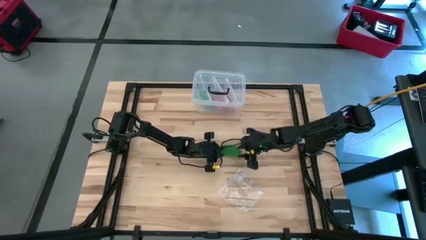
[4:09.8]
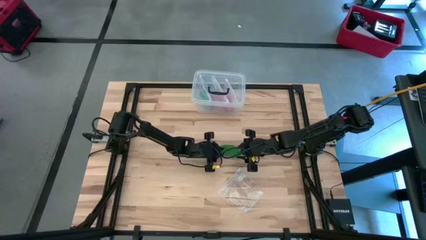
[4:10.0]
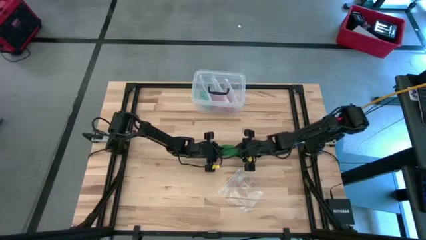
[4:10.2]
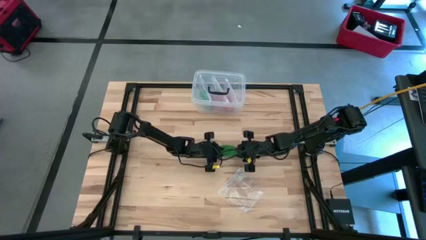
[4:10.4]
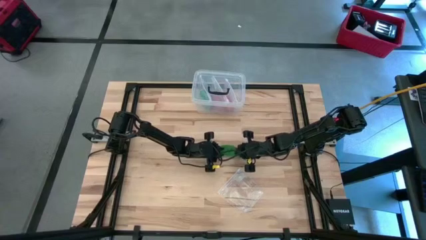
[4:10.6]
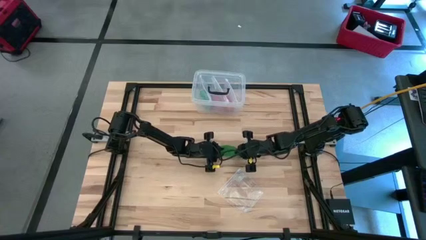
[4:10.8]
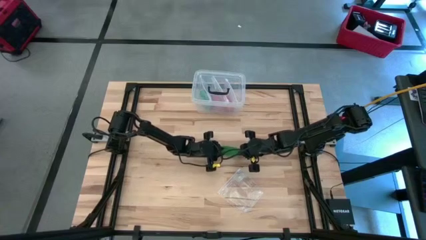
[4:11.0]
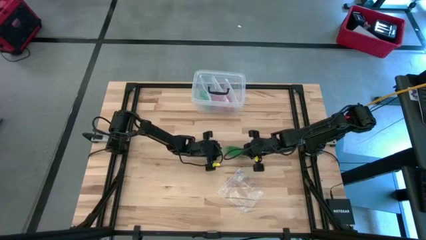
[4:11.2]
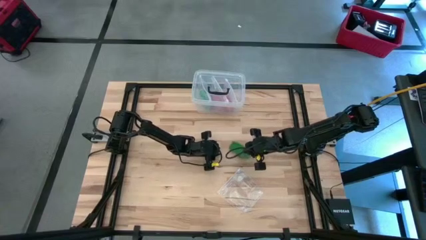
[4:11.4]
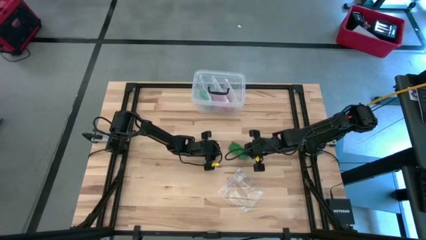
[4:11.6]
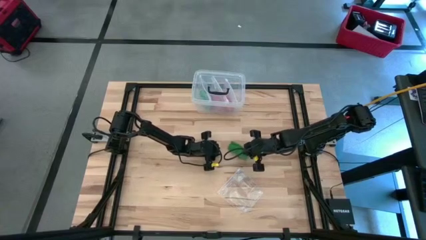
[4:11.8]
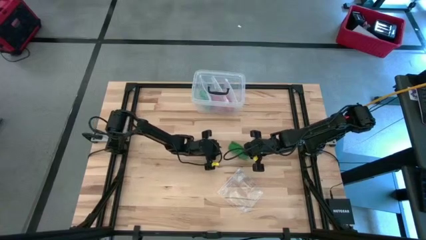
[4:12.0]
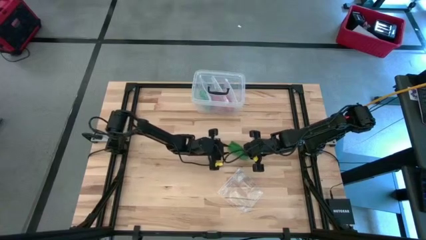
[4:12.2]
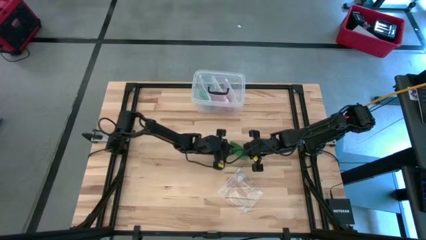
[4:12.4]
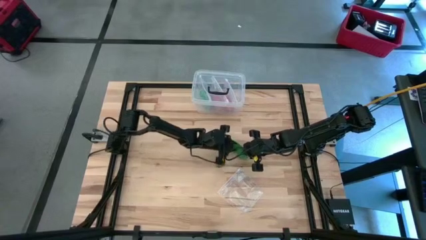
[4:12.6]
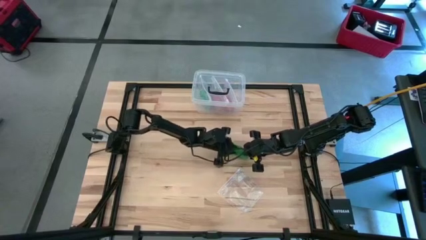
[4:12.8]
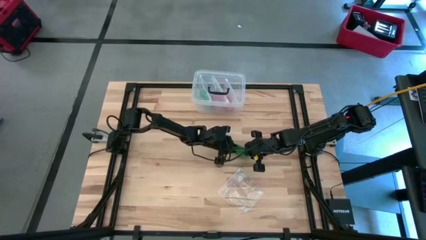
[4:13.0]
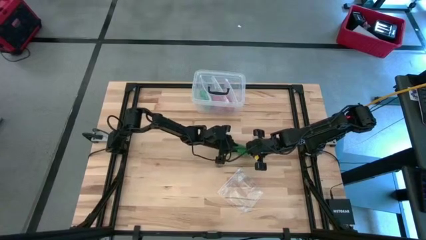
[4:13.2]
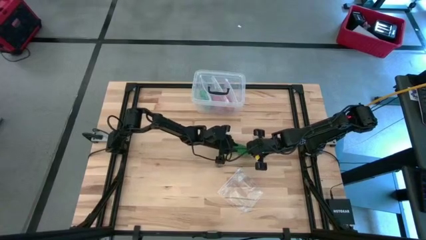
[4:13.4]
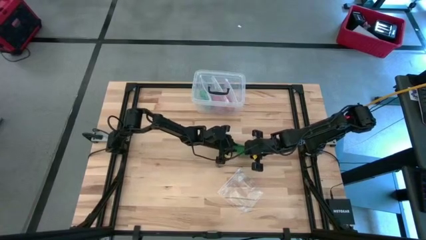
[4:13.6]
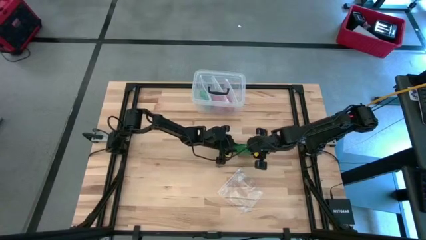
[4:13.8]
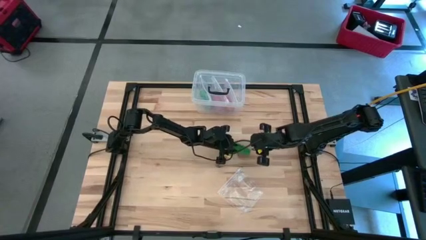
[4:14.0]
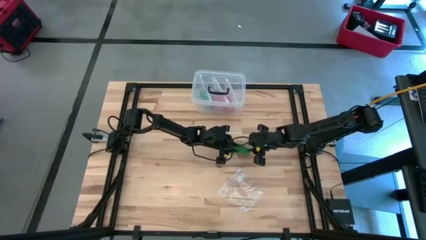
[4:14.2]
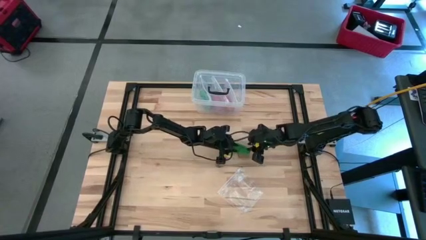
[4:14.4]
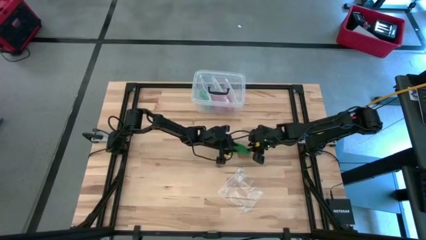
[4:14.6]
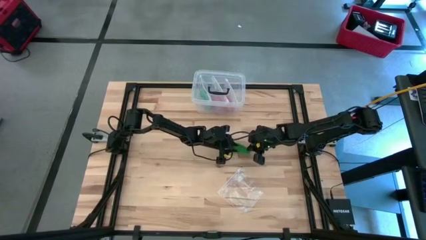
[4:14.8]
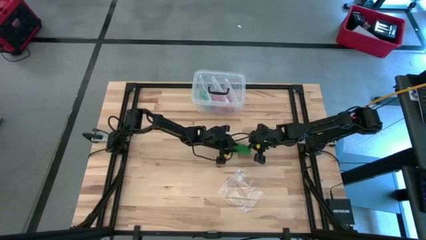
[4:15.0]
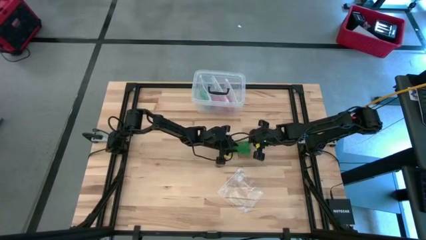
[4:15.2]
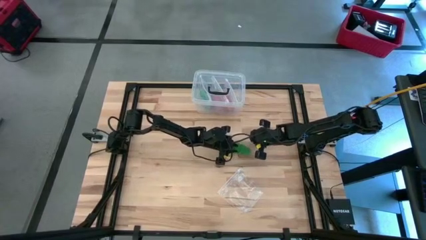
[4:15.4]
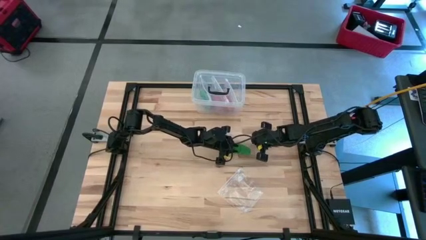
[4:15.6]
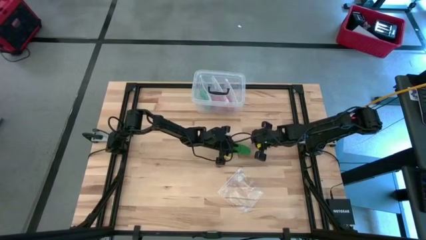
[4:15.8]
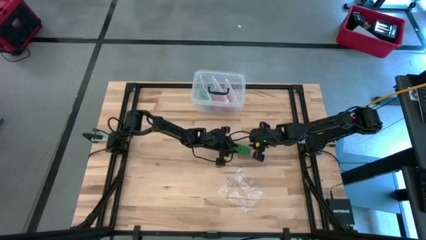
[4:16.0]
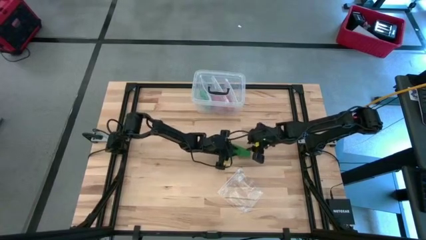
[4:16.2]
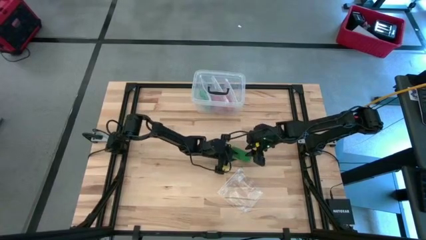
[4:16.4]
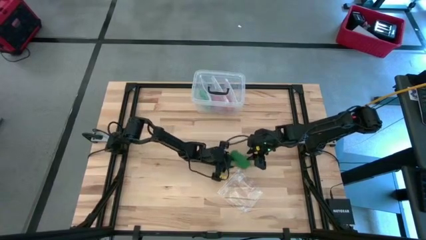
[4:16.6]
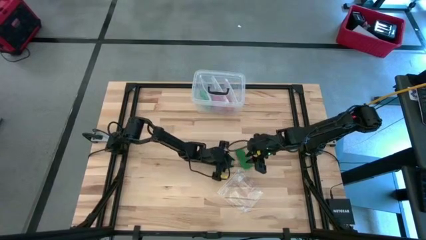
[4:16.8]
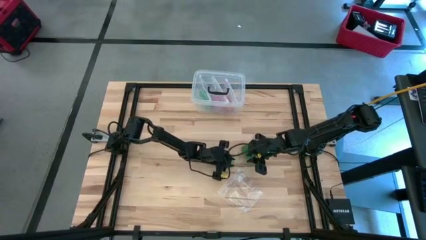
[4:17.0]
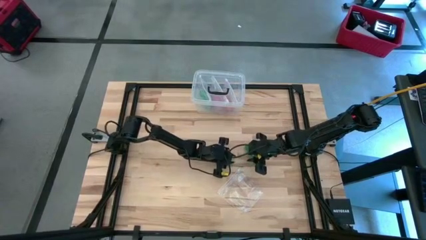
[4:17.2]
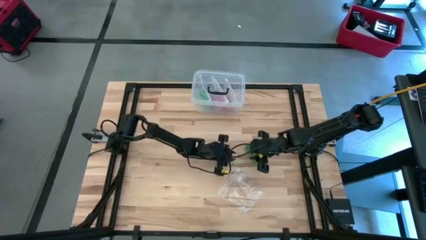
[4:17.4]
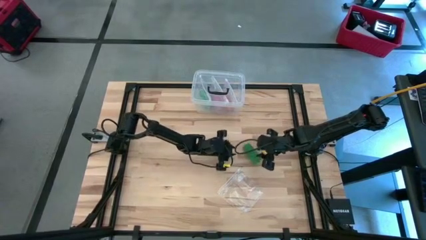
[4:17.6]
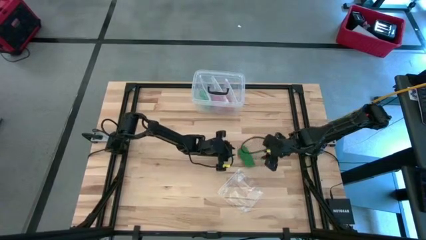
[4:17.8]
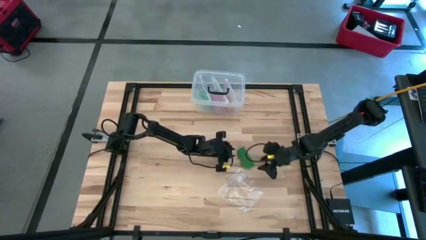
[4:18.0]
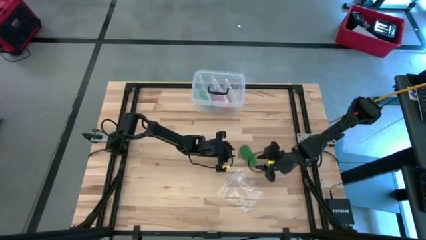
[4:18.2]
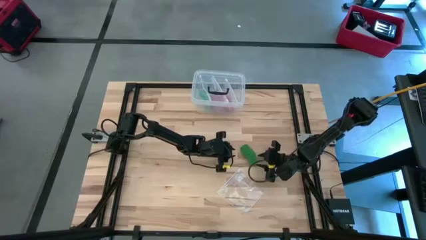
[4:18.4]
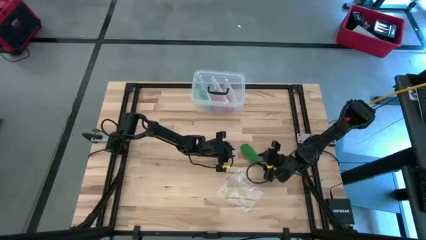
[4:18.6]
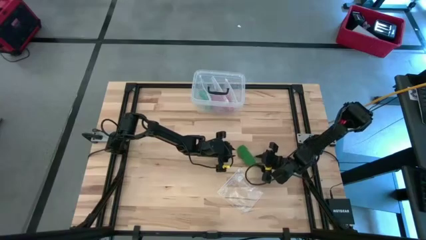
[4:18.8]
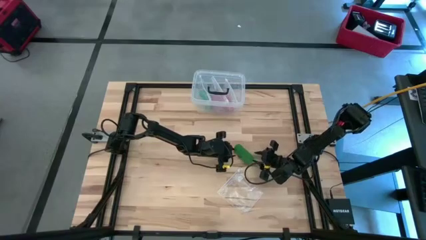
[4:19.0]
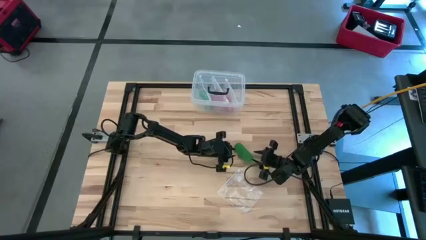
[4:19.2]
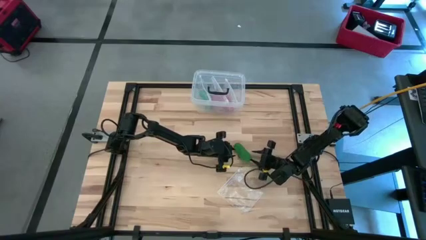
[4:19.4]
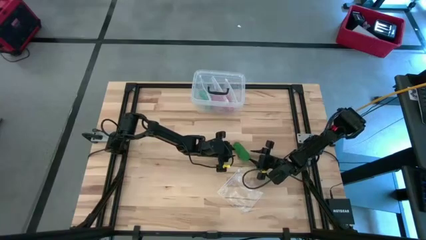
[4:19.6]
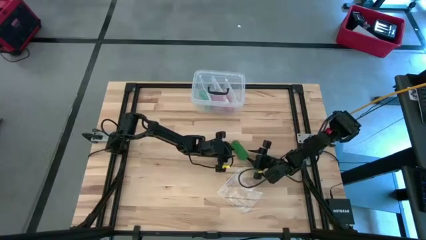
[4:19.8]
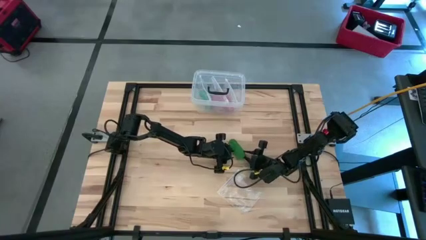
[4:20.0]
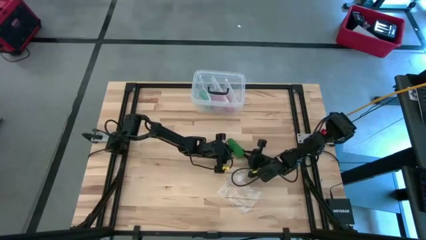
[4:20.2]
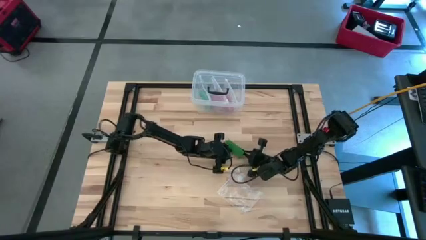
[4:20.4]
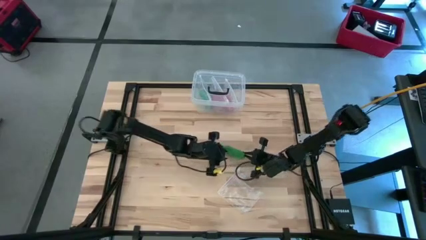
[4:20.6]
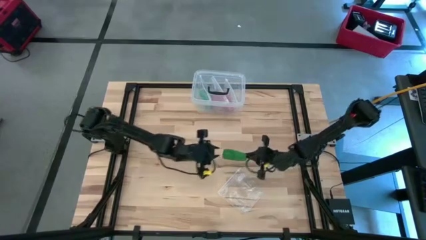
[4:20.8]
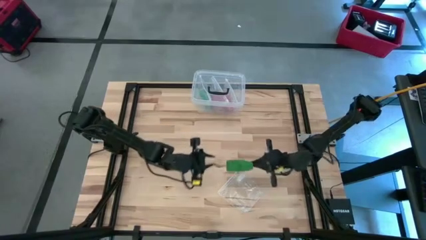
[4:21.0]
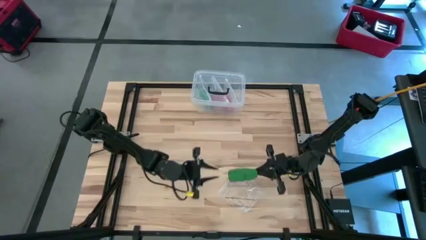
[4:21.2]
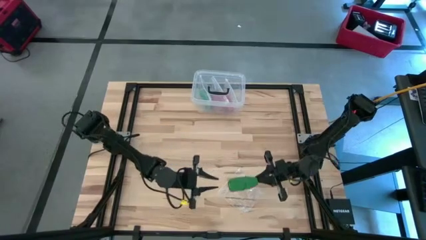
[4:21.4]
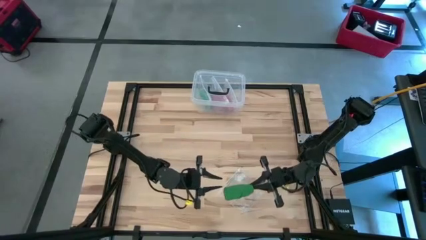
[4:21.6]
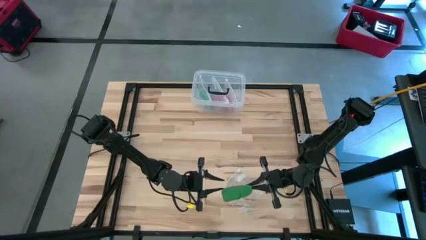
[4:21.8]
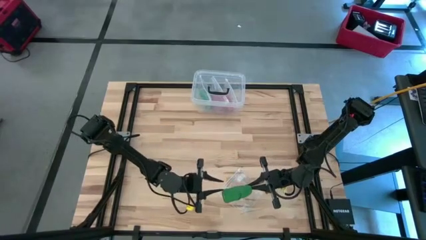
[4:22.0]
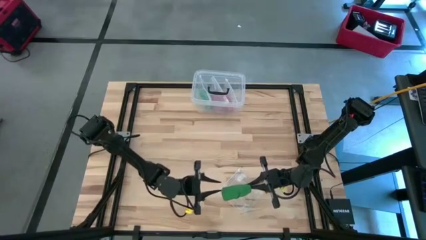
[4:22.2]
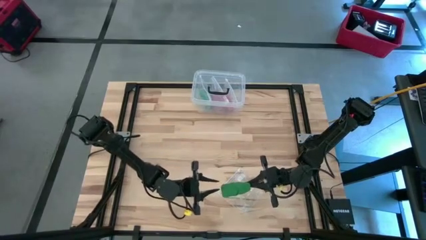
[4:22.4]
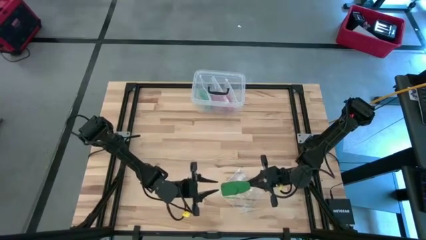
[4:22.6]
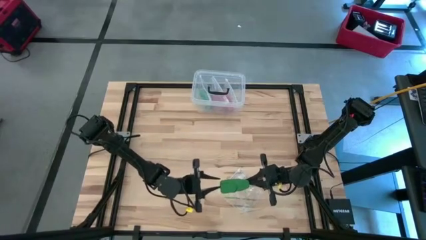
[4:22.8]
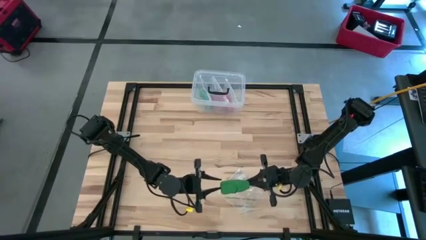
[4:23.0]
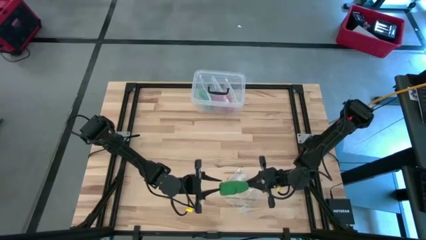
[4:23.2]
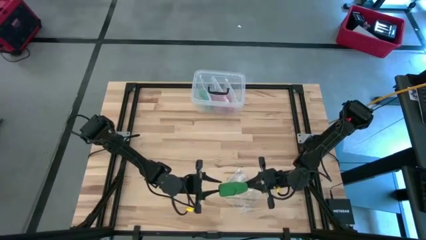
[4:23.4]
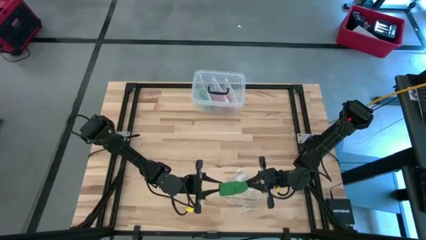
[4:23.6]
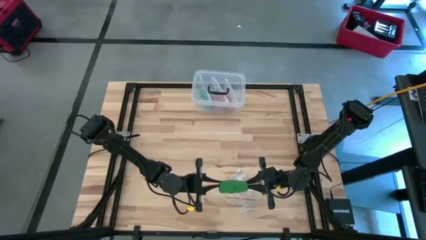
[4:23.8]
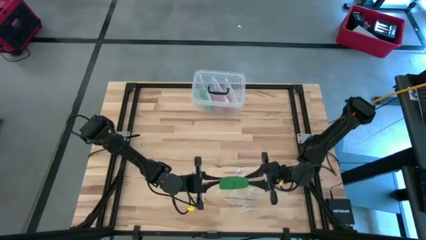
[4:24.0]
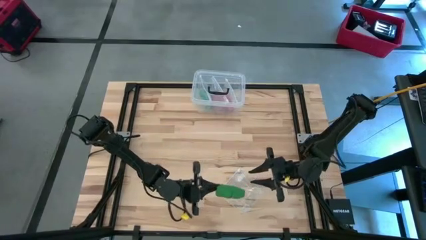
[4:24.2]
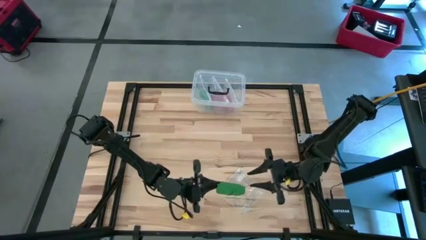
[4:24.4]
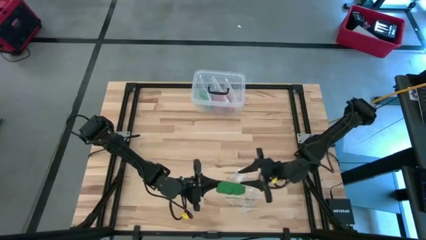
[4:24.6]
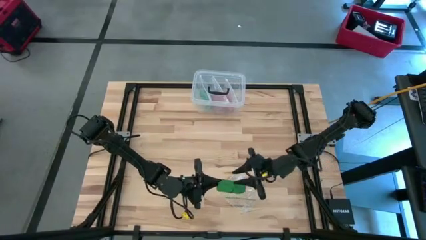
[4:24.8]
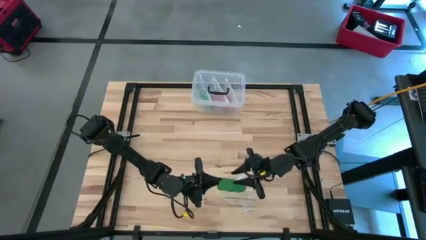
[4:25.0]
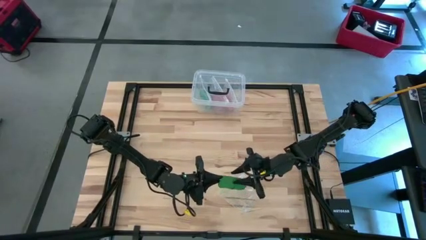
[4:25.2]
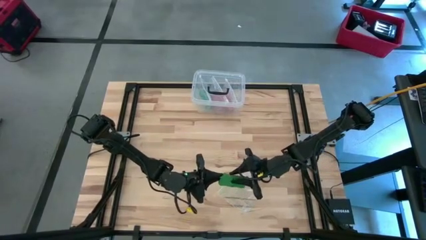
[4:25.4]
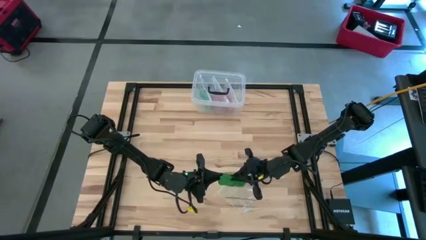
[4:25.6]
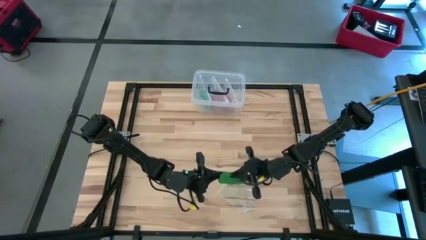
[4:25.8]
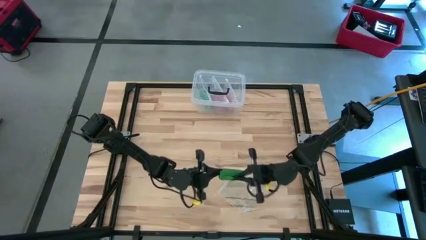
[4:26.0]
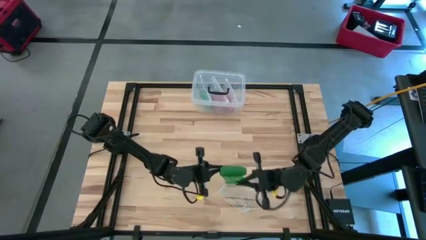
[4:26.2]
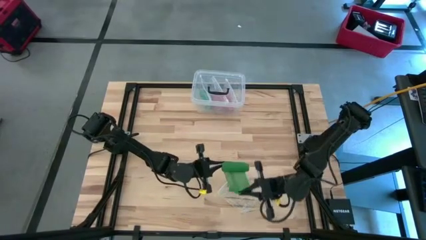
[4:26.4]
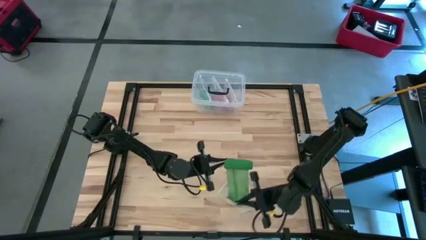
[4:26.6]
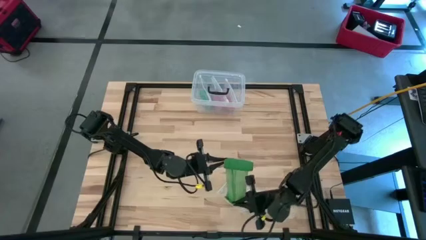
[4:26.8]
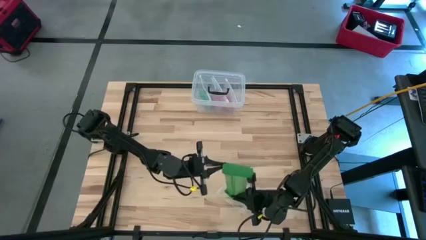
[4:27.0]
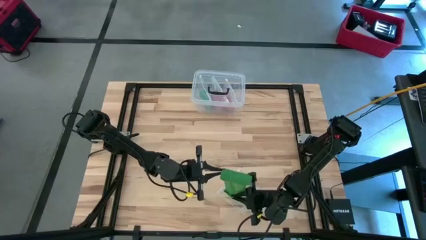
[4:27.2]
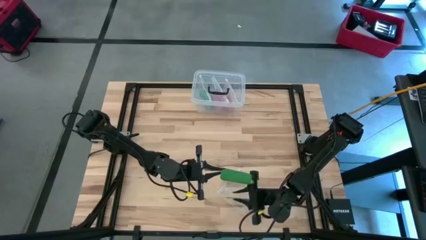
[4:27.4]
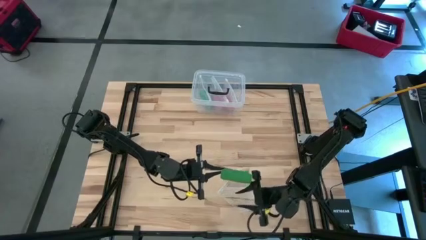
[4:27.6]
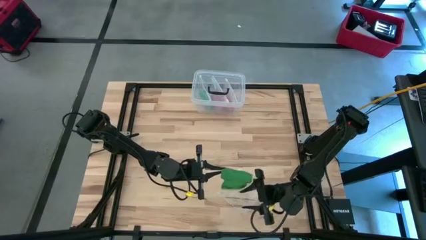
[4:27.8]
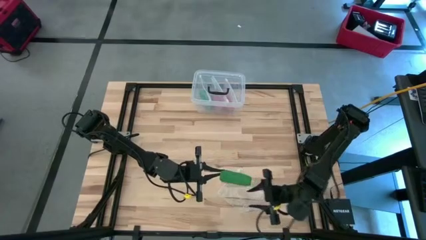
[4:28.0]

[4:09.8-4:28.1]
Task: Roll bandage
Roll the green bandage
